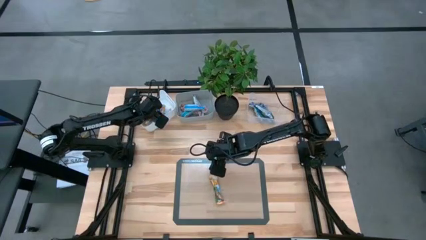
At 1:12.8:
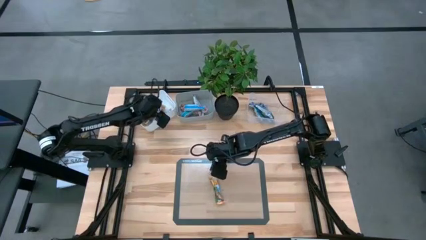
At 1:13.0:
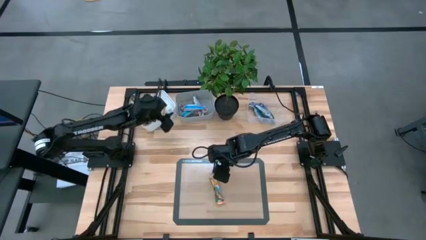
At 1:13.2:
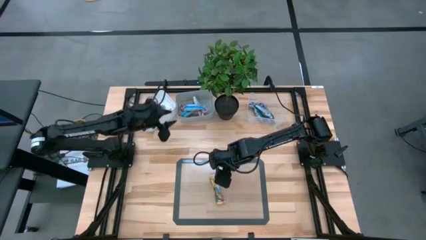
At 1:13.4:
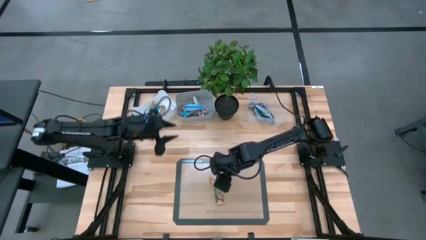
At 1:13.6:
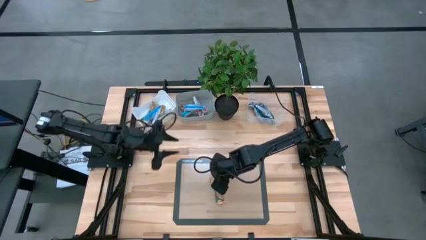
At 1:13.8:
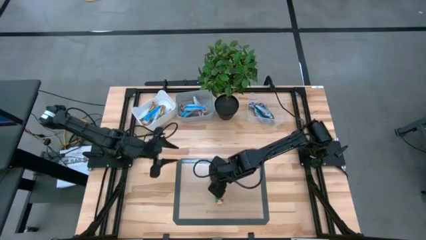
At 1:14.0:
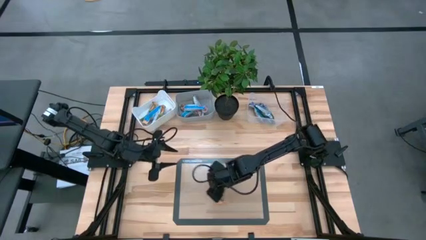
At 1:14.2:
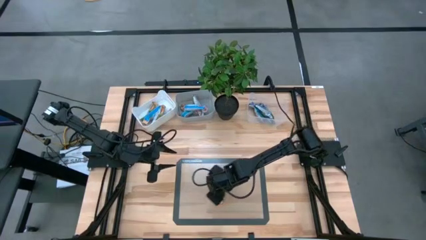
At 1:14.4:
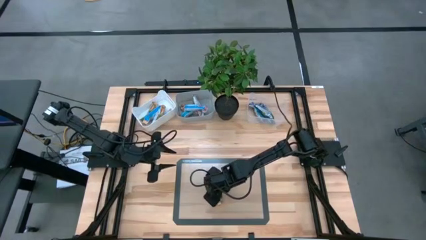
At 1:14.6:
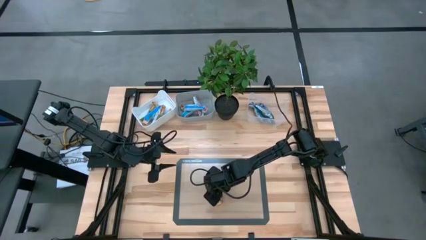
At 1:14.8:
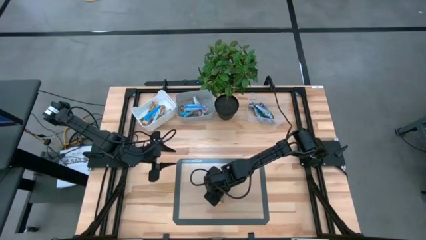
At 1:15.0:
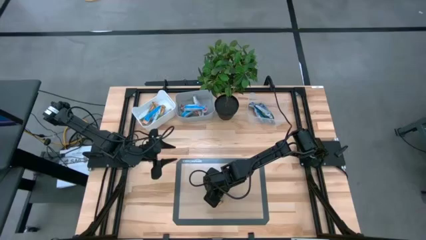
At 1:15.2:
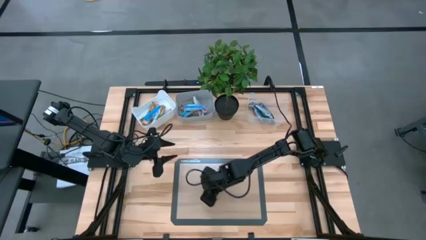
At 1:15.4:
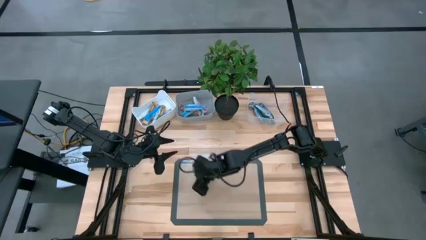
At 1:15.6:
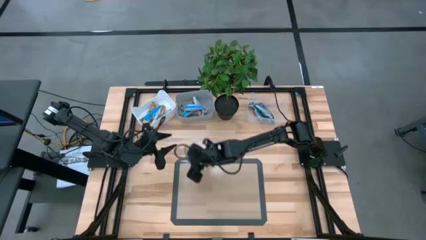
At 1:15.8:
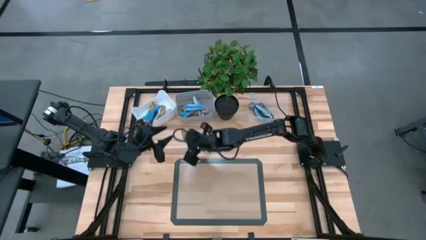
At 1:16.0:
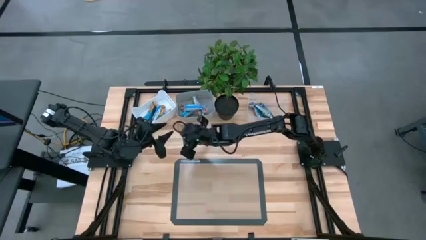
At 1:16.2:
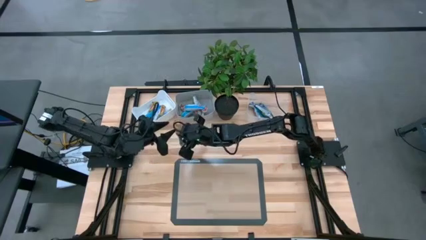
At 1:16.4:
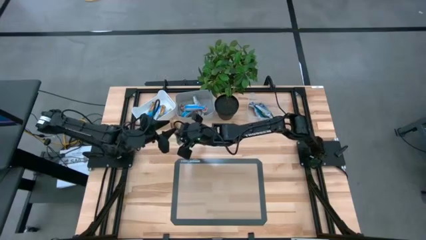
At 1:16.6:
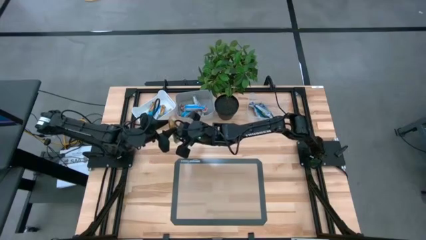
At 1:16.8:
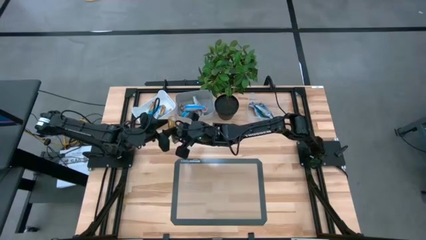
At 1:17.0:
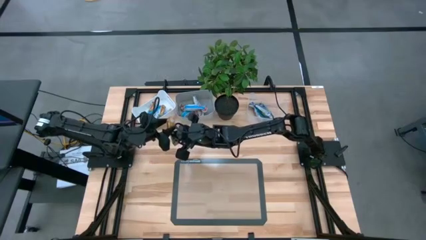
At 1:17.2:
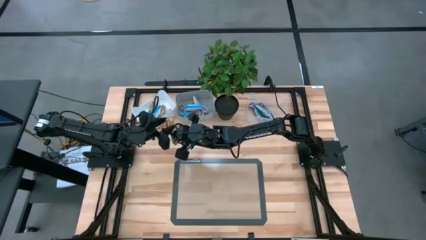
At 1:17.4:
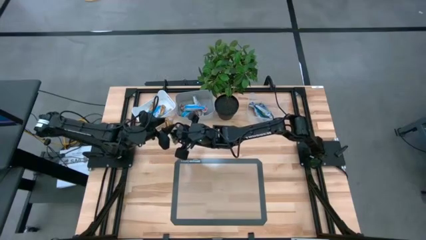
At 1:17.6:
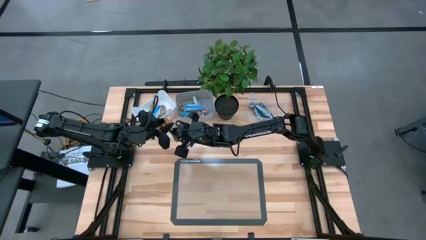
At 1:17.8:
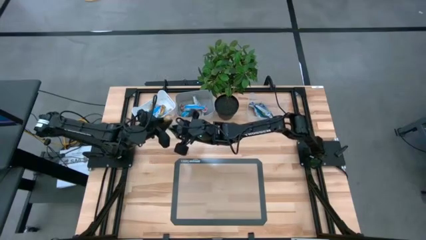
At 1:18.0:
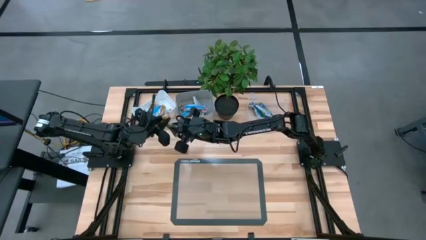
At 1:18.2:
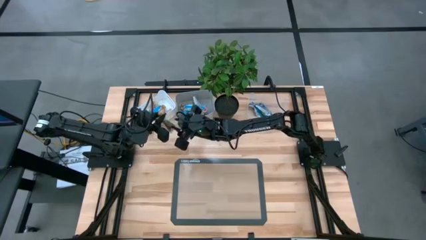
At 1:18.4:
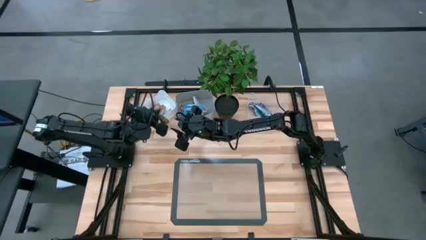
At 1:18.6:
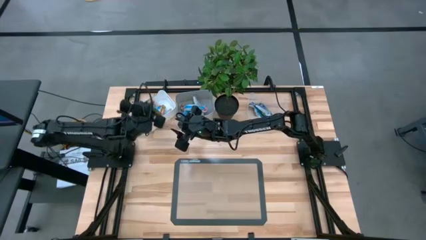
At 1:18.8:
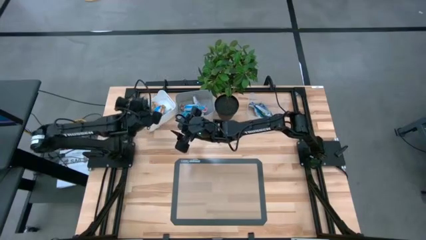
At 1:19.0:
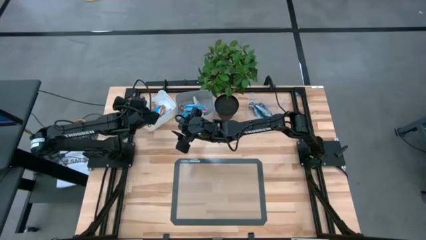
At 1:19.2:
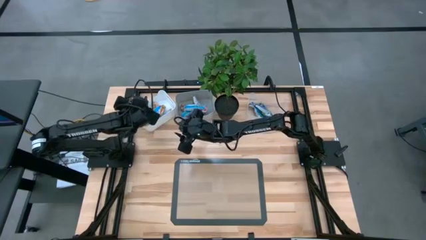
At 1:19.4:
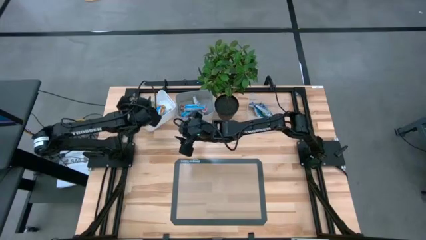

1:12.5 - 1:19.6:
Task: Pick and place Granola Bars by type
Put the yellow granola bar into the white bin

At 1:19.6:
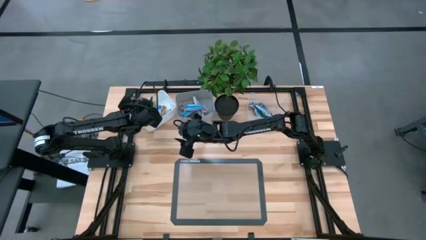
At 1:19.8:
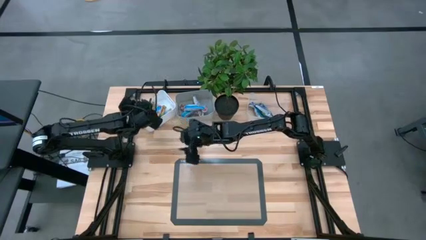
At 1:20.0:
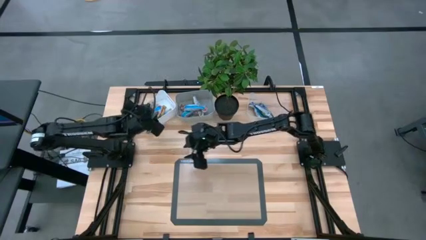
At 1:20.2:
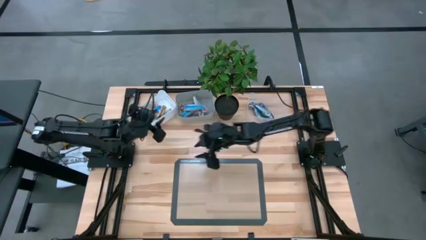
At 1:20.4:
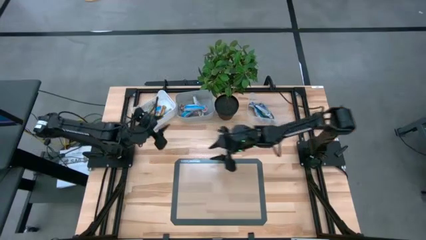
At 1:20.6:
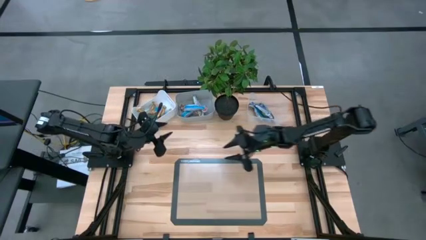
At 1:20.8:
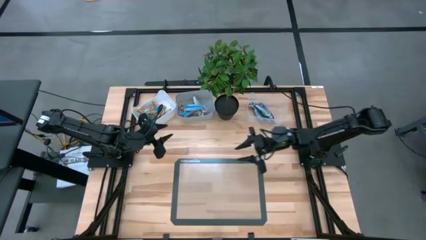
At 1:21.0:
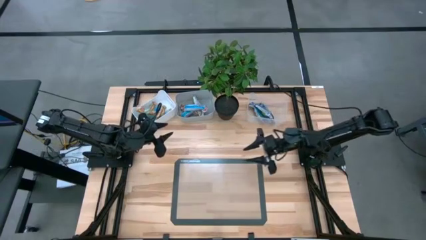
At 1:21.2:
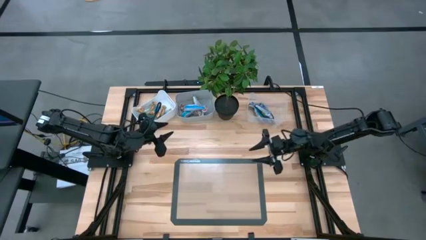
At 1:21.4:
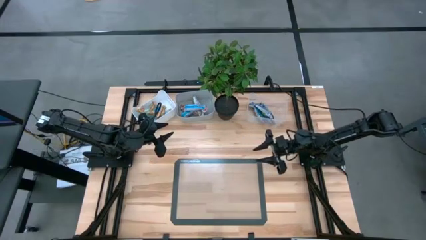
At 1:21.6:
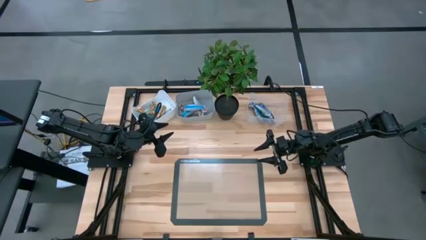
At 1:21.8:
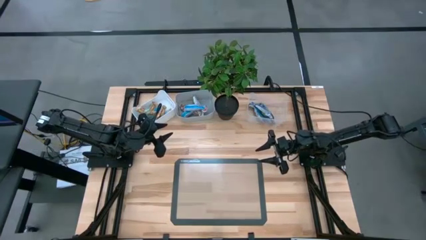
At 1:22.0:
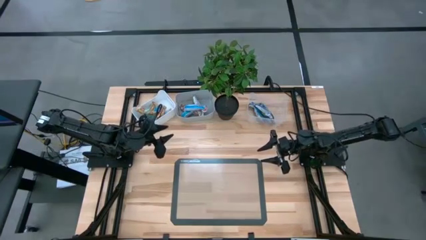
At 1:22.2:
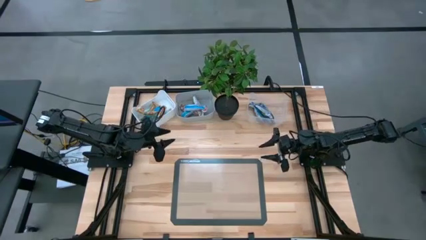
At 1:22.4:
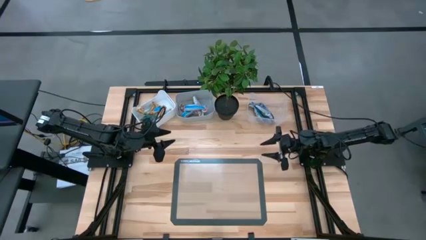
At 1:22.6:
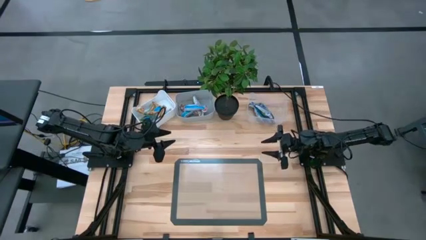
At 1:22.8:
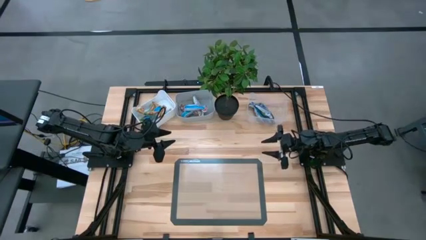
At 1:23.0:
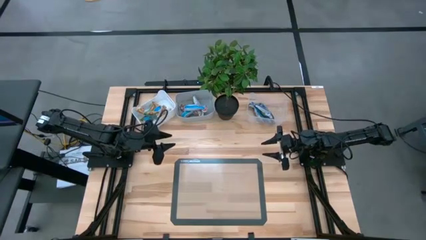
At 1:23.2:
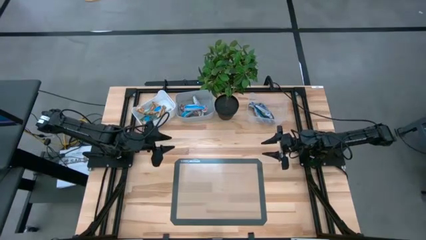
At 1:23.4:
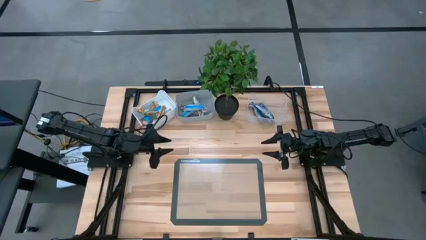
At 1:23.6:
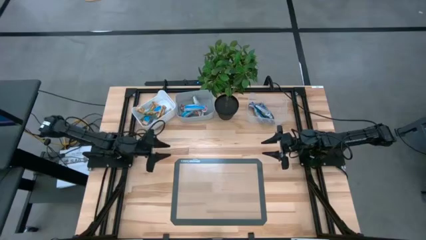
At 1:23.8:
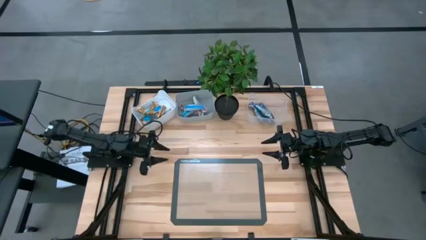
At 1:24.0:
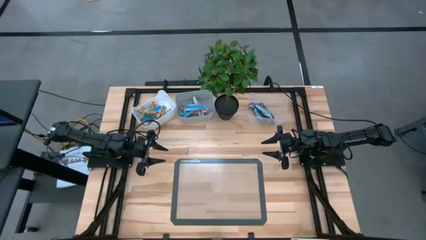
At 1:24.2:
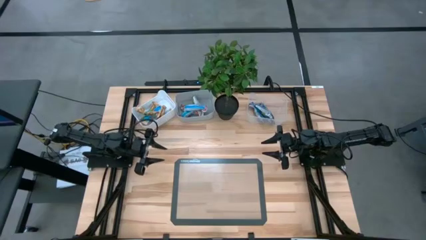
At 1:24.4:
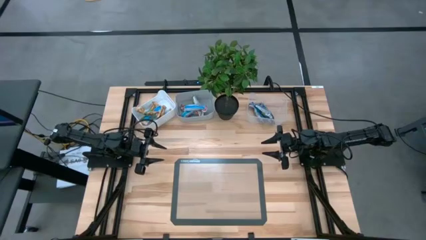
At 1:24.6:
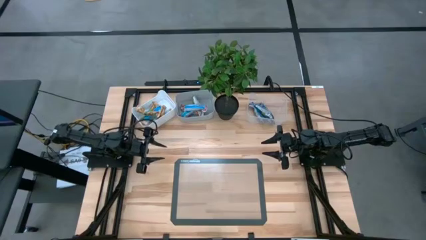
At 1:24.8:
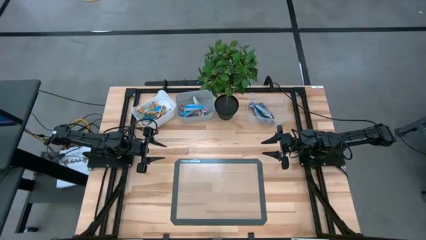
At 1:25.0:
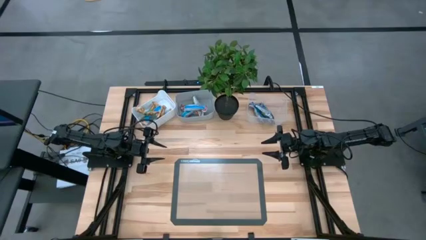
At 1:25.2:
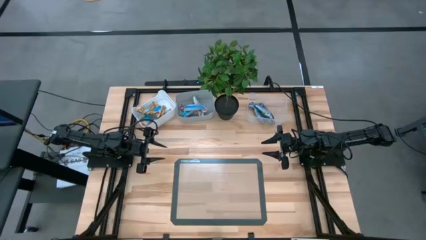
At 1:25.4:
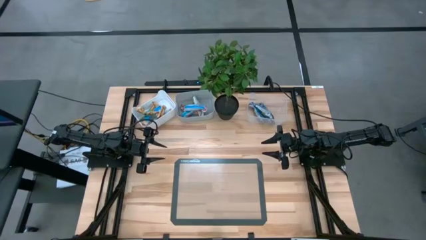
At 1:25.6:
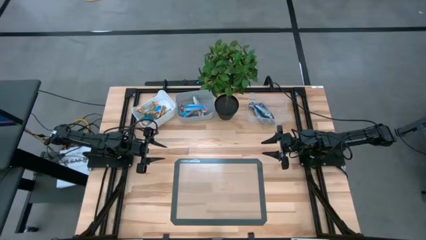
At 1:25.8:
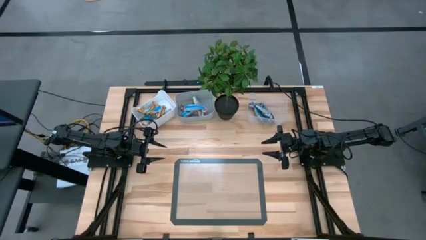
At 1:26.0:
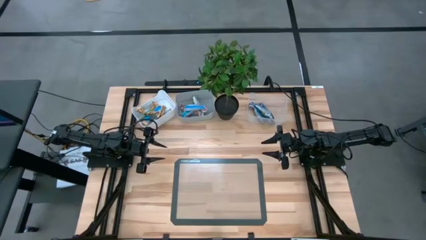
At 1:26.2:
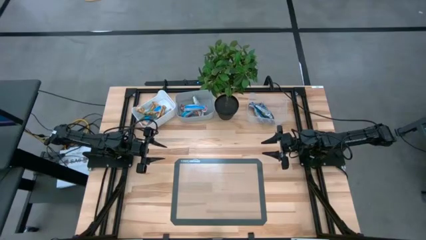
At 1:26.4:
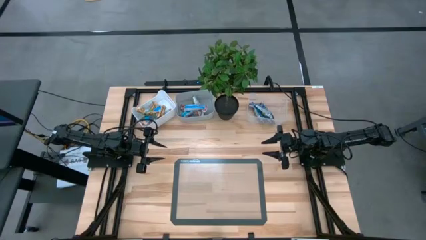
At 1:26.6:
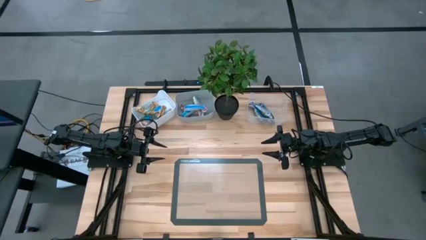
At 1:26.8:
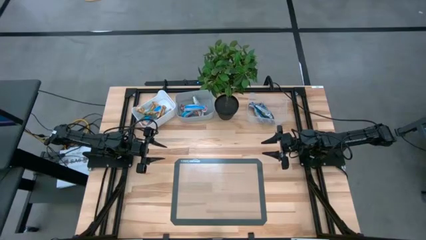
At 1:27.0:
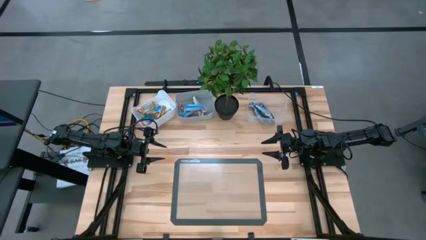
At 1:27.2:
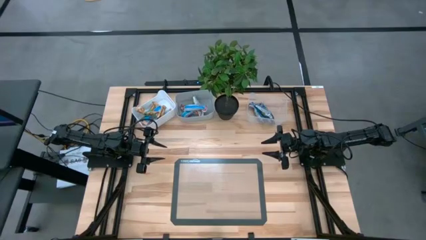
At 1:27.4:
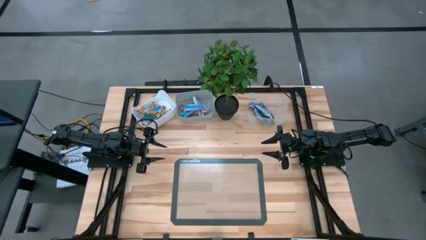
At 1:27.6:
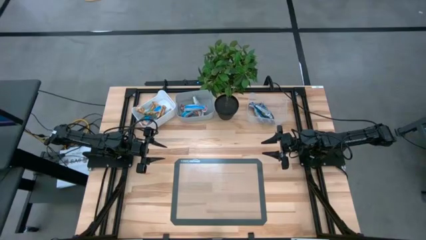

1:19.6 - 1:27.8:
Return to Home Position

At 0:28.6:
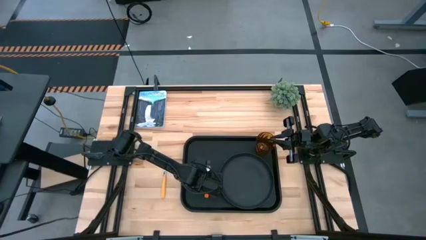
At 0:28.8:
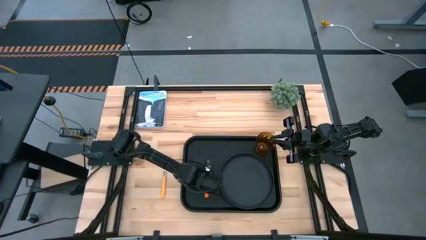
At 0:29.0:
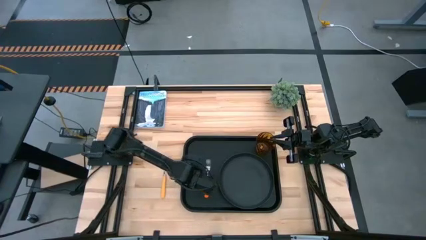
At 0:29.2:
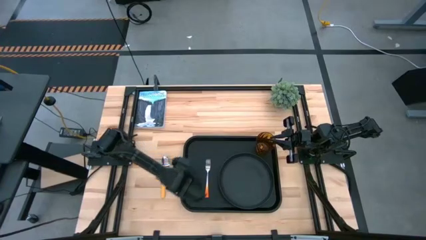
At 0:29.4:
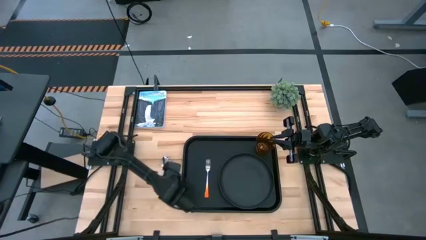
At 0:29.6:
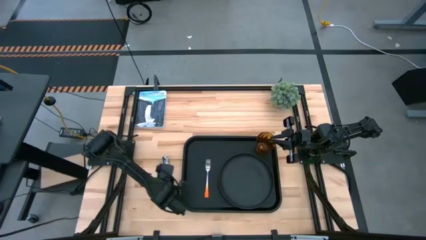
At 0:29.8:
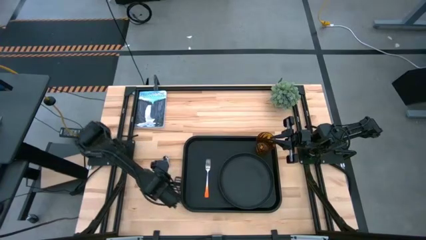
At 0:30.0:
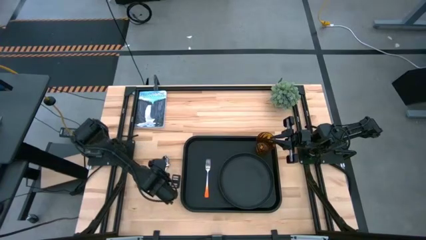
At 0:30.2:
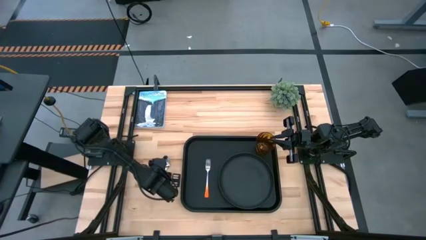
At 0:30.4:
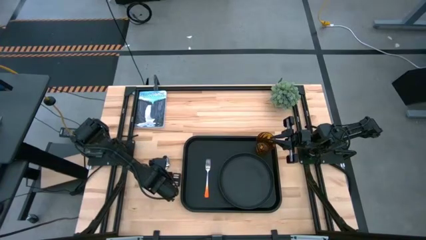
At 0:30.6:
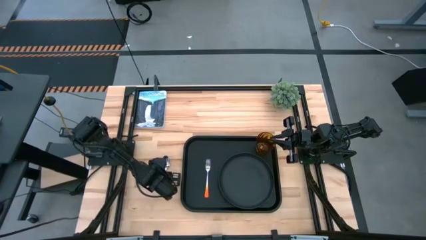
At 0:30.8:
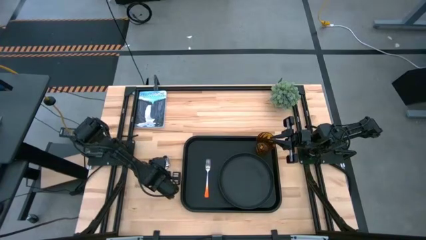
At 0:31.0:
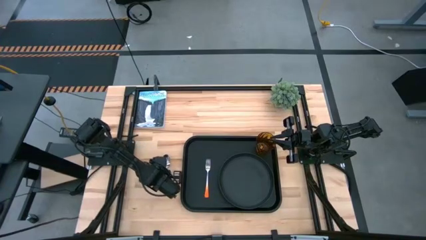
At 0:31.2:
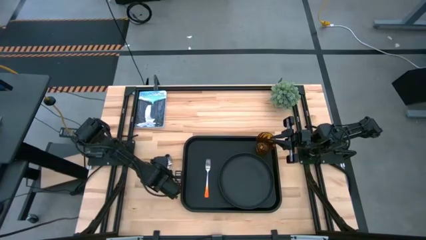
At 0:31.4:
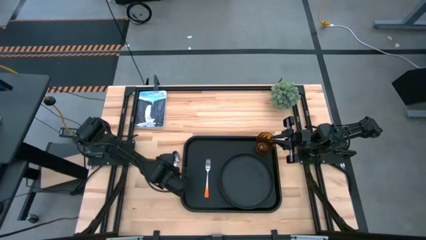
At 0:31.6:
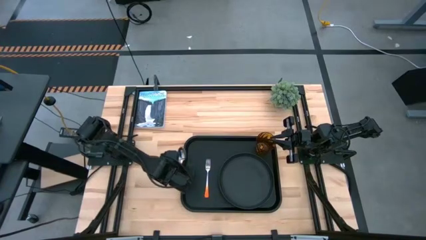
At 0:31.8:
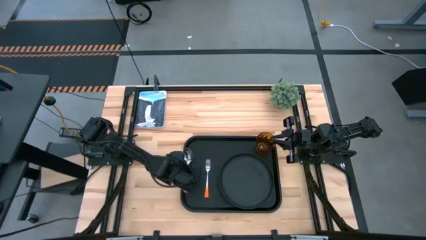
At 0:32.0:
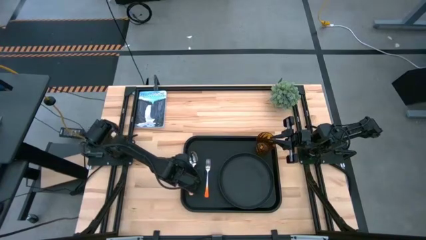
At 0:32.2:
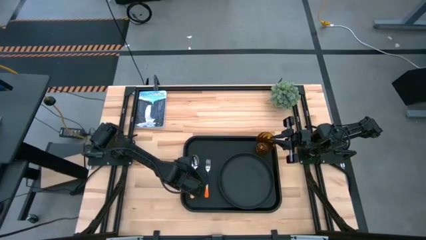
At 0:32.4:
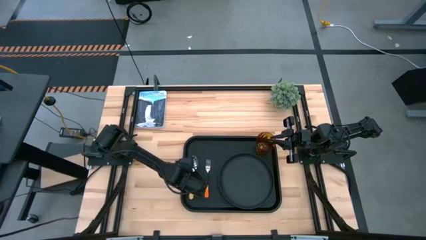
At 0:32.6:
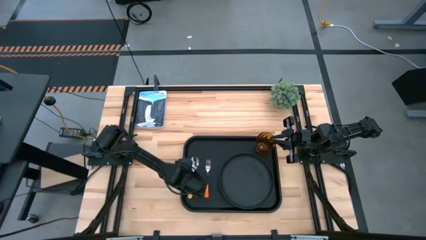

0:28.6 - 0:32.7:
Task: Pick and place plate/cup/fork/spoon on tray
Put the yellow spoon on the black serving tray to the left of the orange fork
